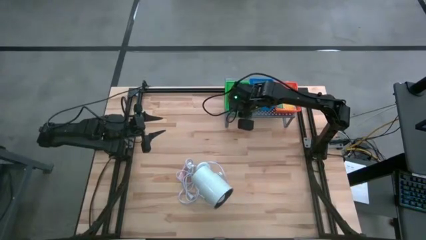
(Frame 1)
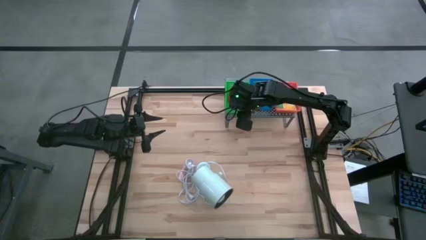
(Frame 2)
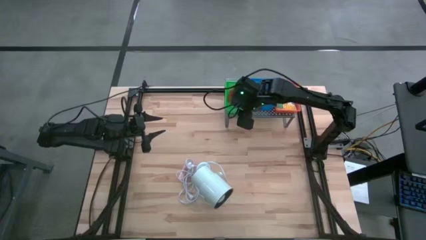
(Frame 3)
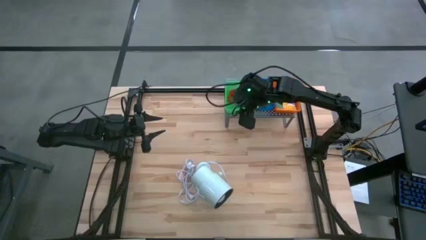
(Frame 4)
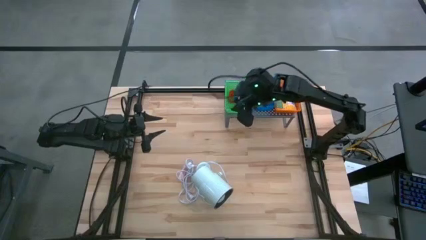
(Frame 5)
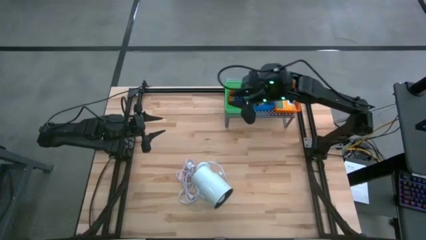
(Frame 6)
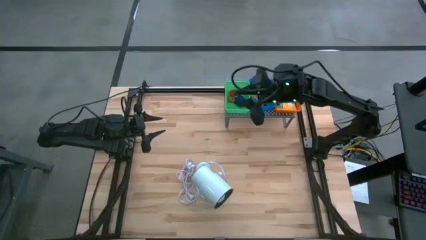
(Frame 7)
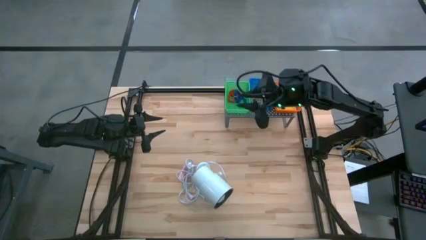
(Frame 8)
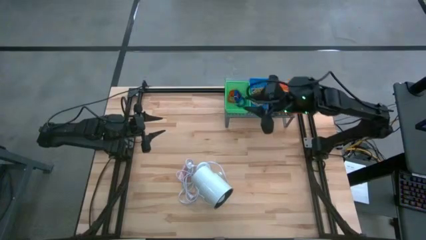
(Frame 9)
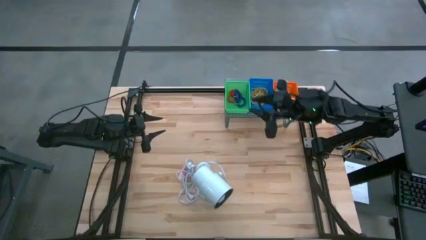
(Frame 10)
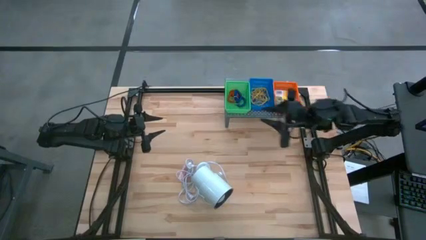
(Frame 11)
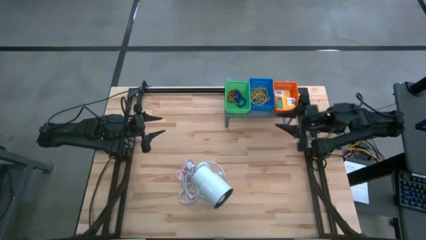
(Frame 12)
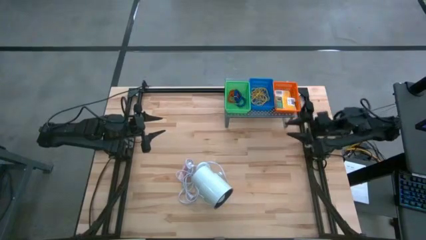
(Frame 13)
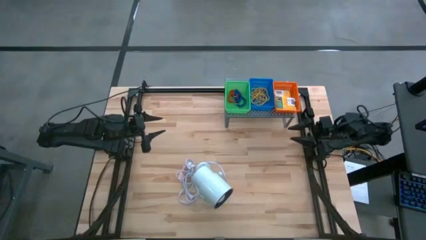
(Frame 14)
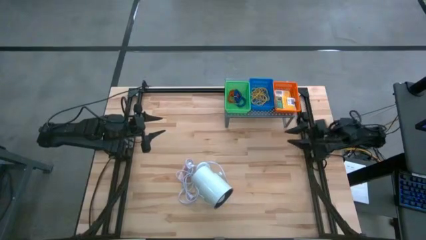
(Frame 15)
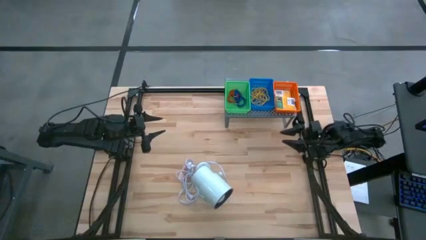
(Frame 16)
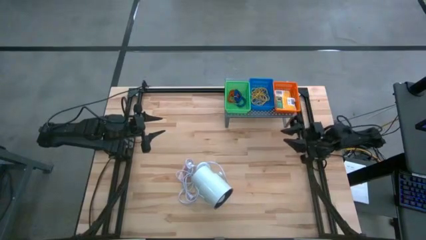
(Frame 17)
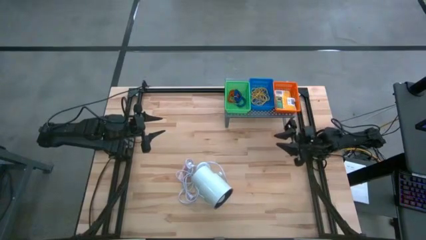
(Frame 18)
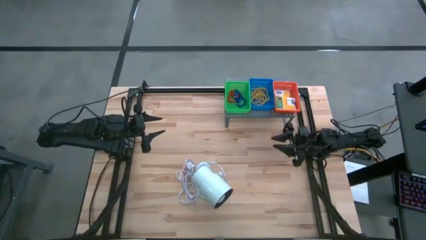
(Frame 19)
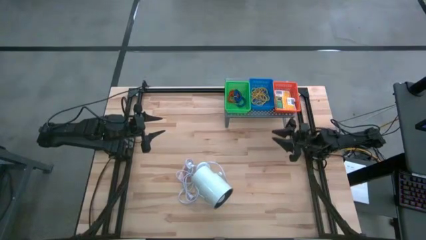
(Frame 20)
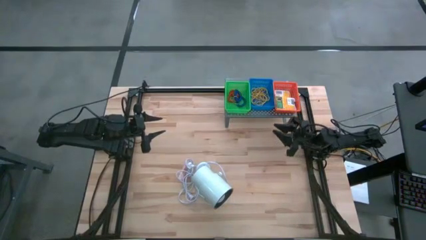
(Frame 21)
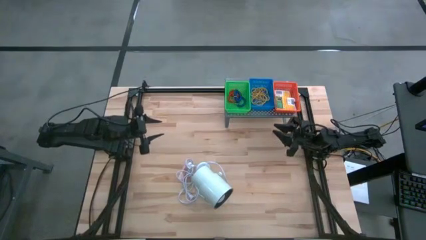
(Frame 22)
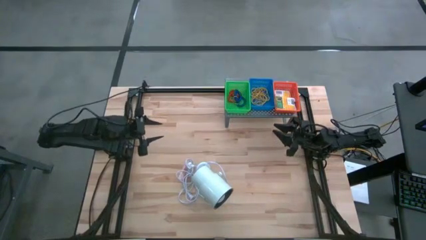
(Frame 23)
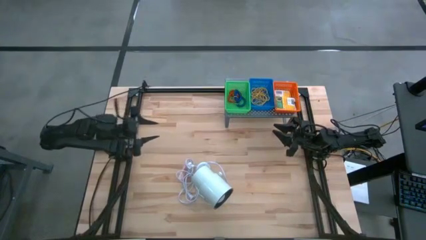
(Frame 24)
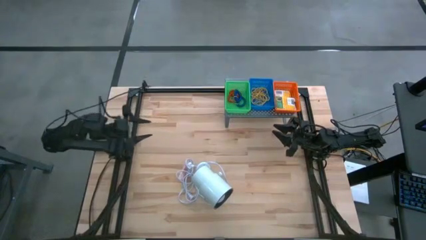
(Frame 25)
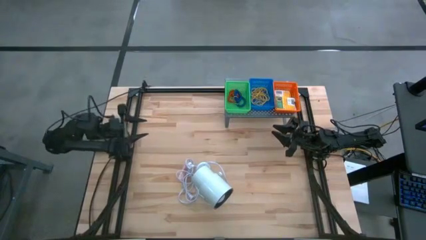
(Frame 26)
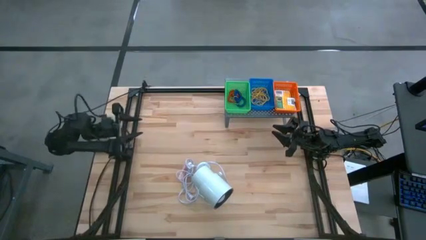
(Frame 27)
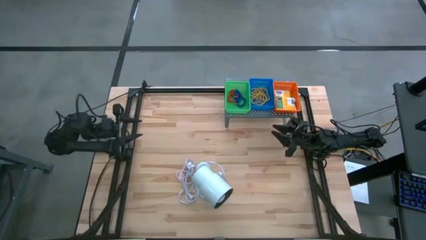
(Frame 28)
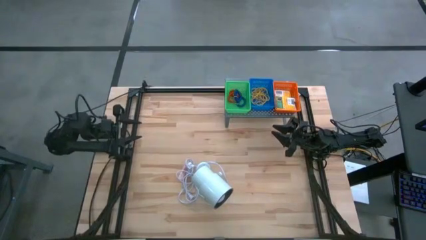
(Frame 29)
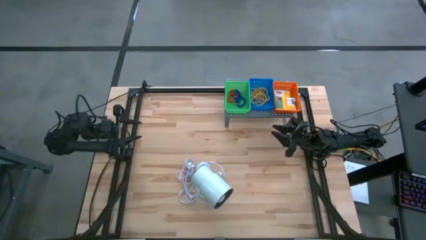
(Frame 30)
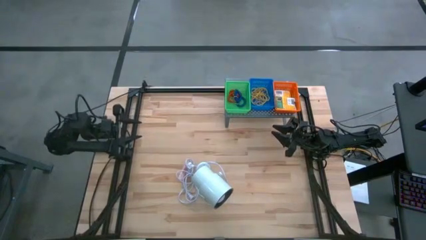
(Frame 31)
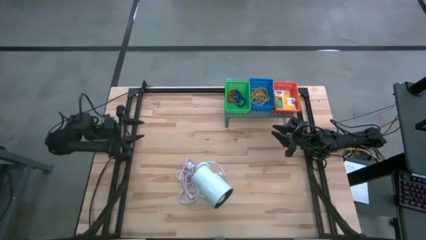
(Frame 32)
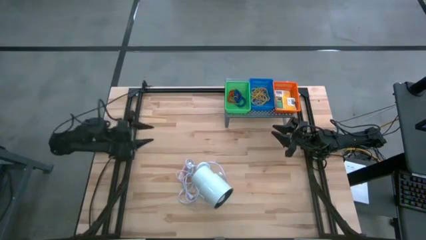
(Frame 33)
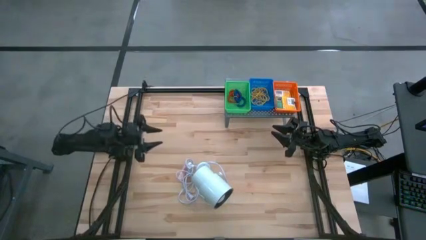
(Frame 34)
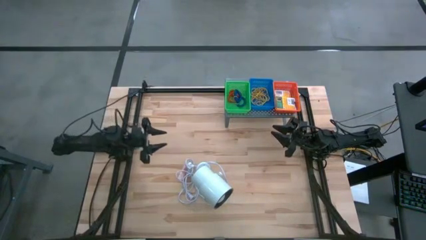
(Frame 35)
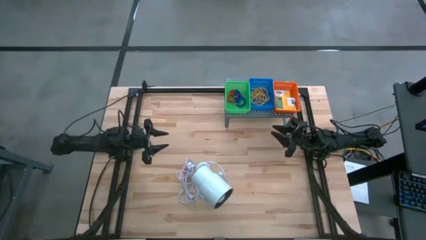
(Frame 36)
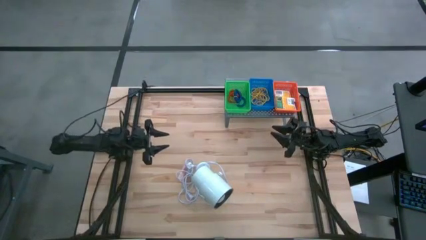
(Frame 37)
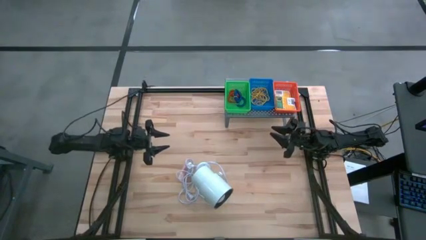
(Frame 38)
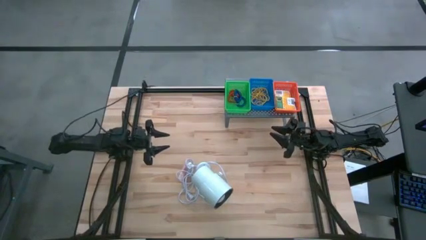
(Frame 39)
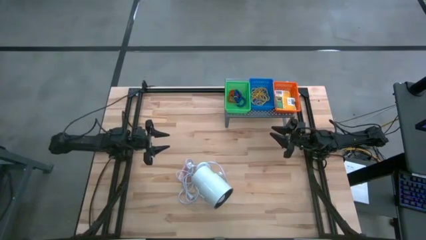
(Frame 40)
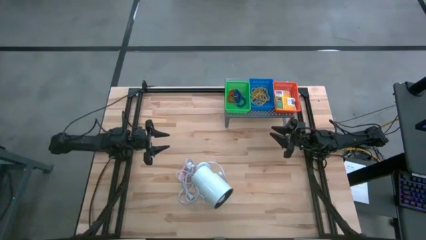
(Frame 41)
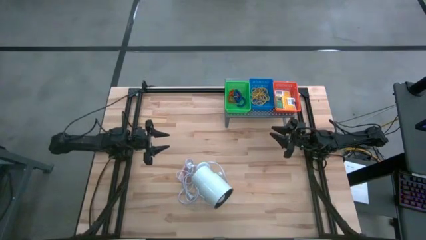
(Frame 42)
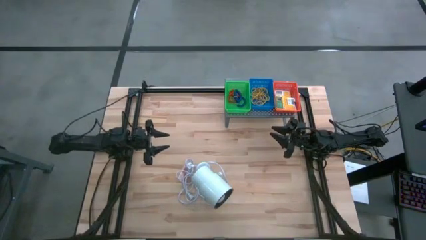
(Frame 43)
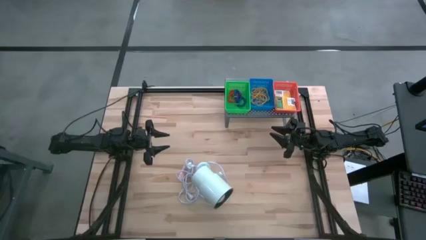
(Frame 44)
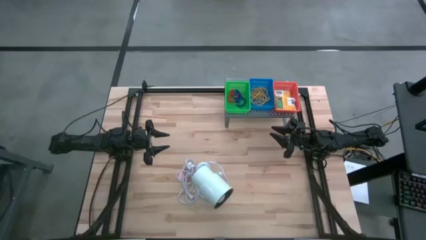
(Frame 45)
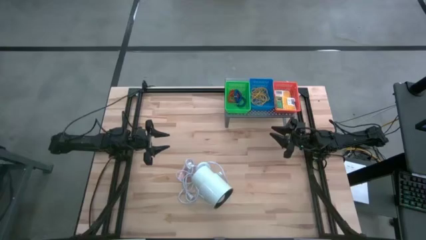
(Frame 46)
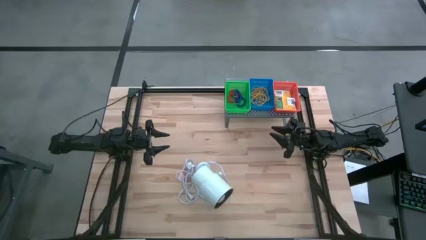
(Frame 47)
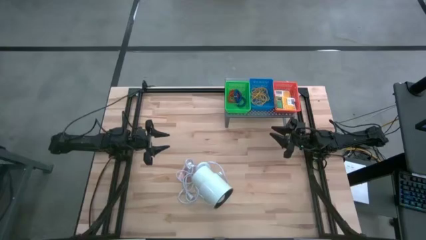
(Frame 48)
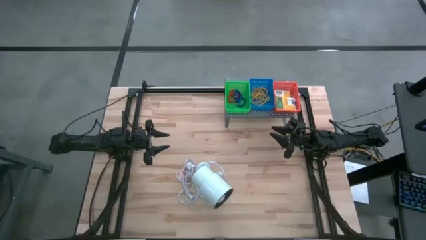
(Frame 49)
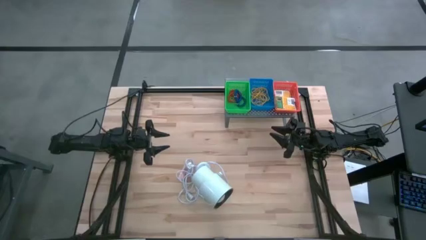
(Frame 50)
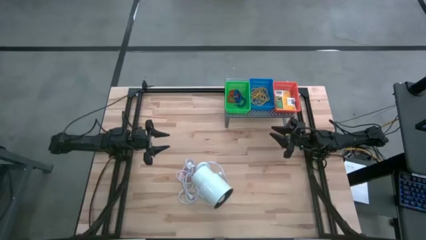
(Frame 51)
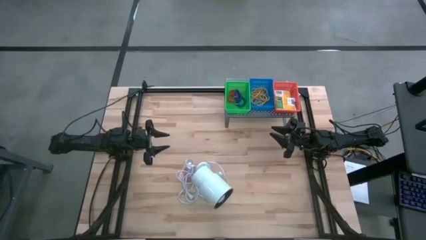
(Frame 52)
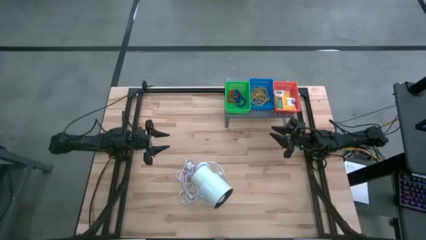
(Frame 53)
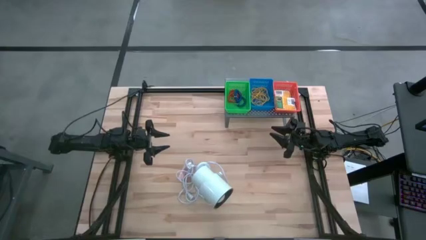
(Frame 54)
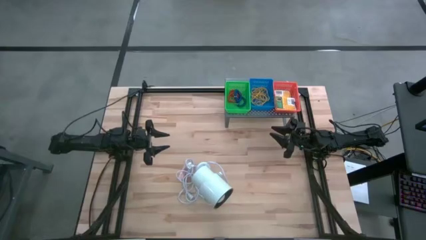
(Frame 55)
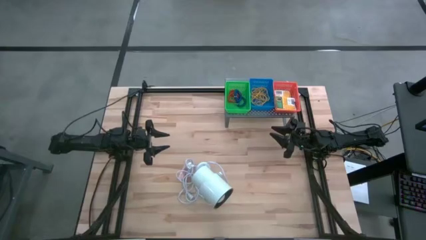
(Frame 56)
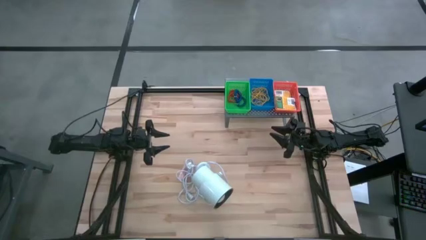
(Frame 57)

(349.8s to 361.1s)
Task: Pick & Place Office Desk Supplies
Return to Home Position
